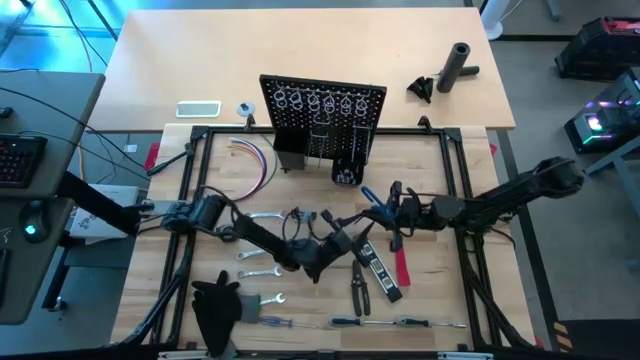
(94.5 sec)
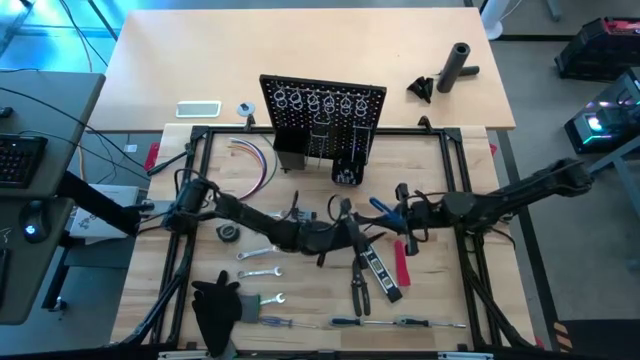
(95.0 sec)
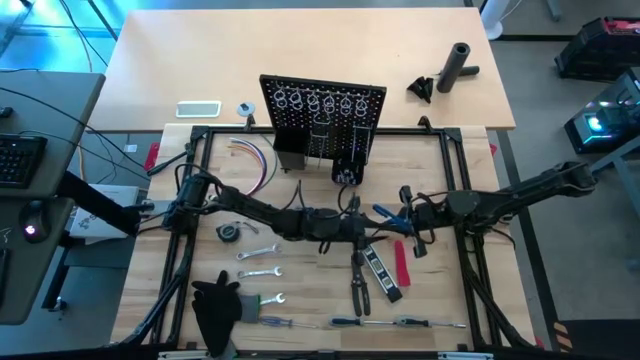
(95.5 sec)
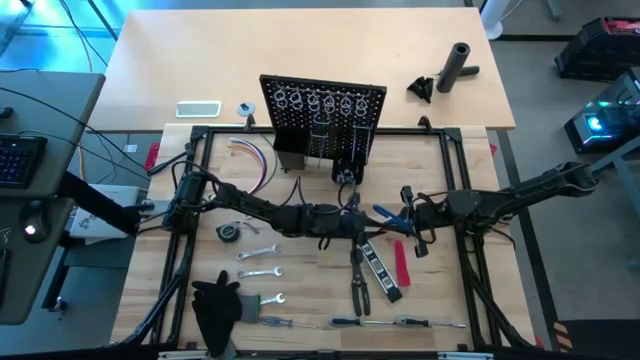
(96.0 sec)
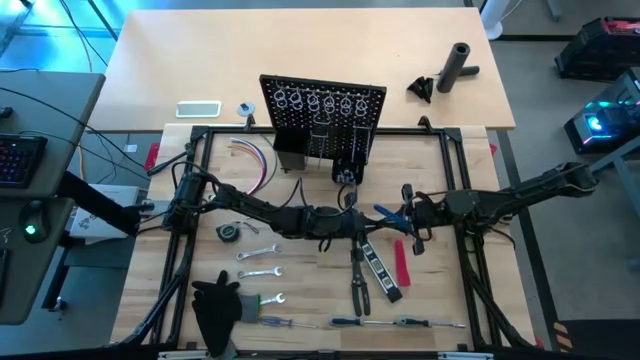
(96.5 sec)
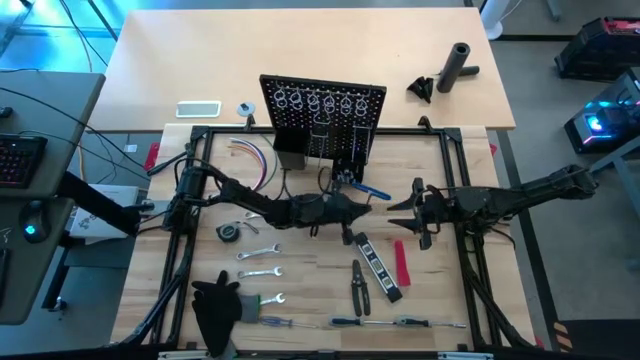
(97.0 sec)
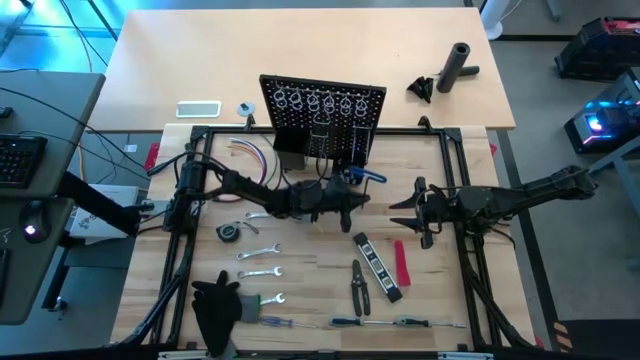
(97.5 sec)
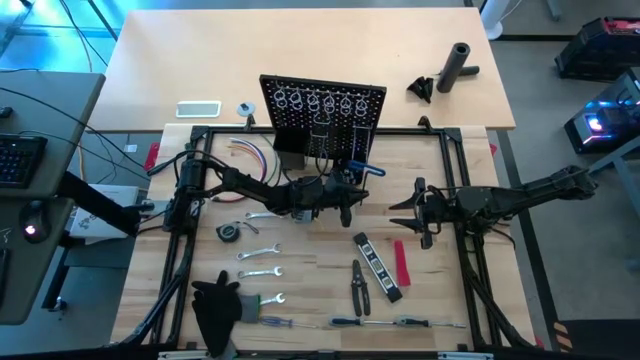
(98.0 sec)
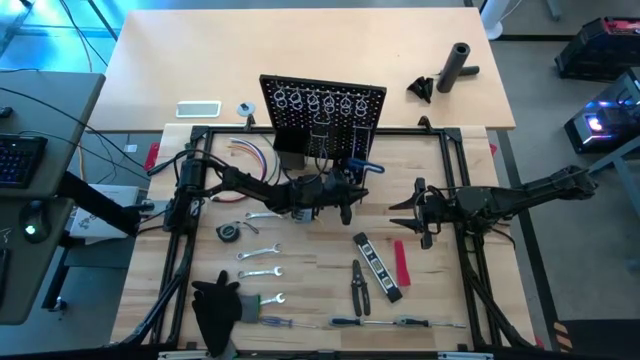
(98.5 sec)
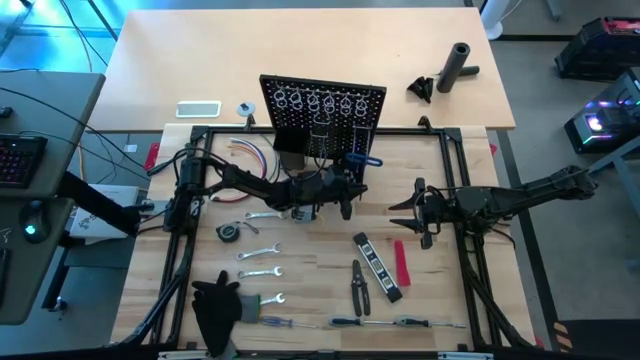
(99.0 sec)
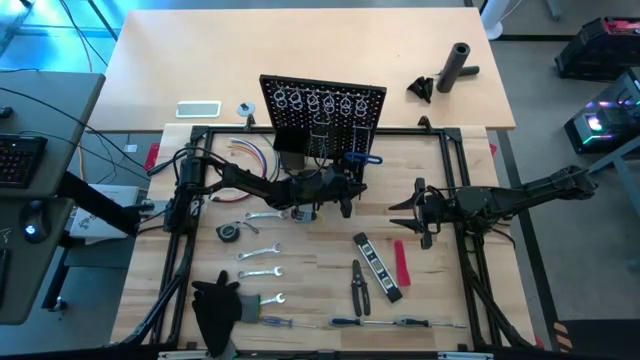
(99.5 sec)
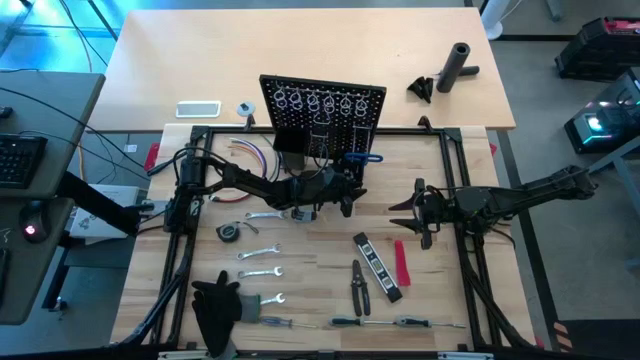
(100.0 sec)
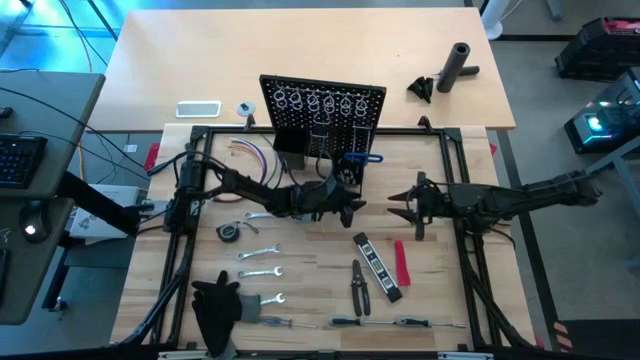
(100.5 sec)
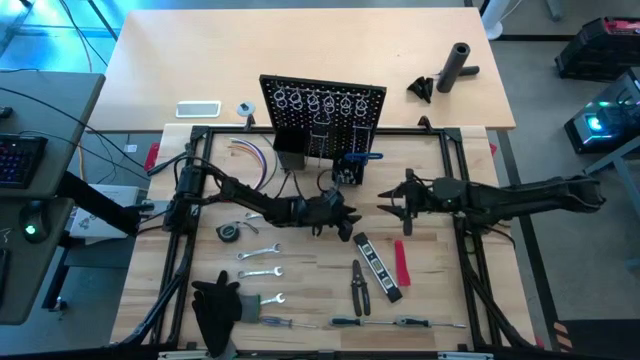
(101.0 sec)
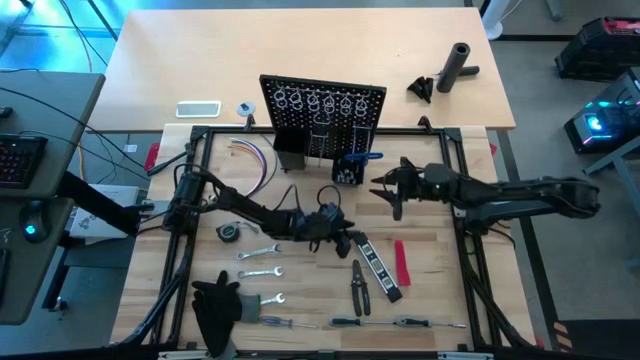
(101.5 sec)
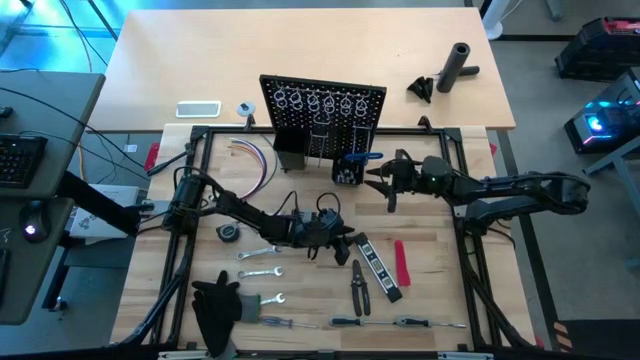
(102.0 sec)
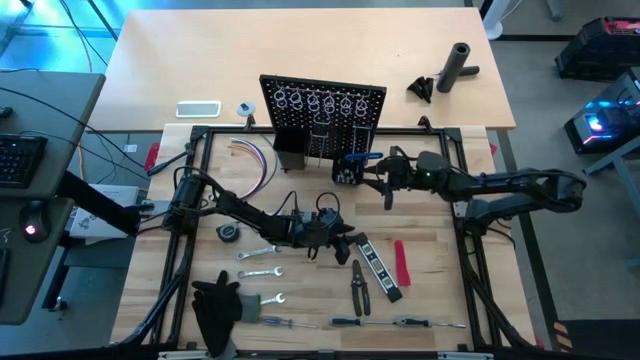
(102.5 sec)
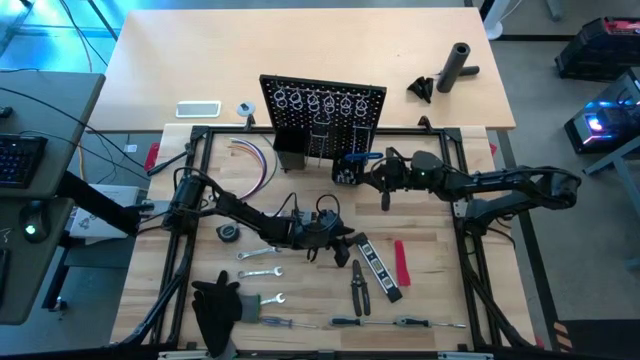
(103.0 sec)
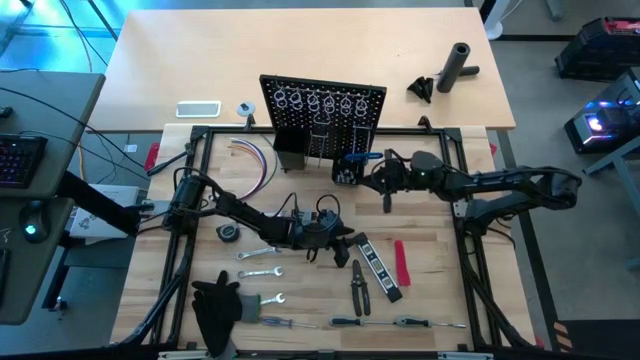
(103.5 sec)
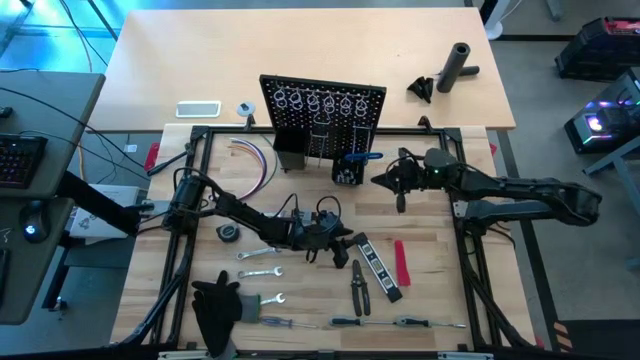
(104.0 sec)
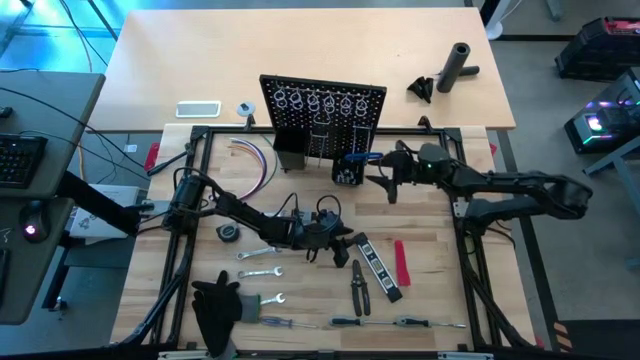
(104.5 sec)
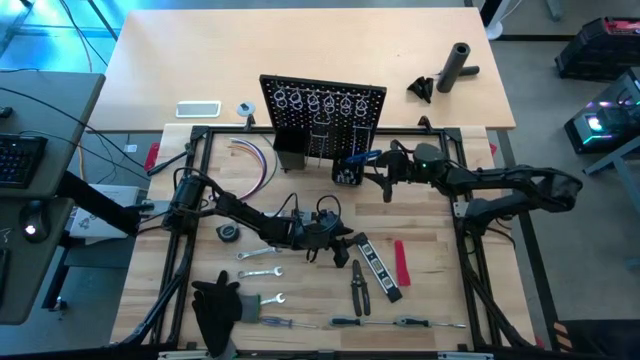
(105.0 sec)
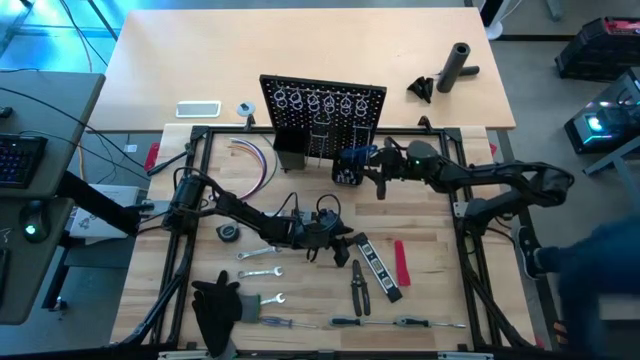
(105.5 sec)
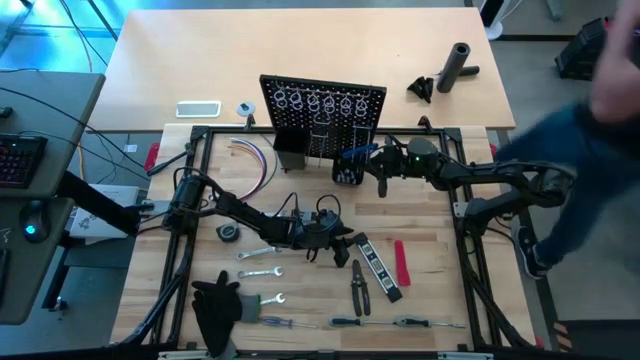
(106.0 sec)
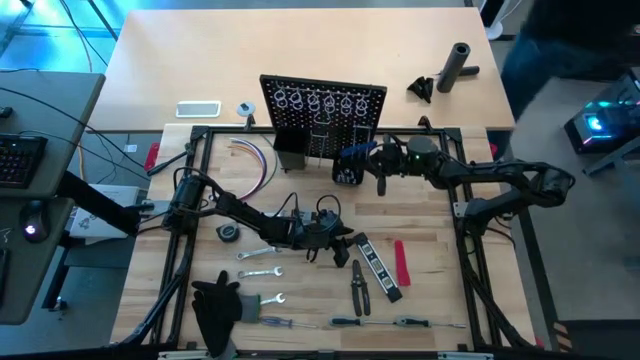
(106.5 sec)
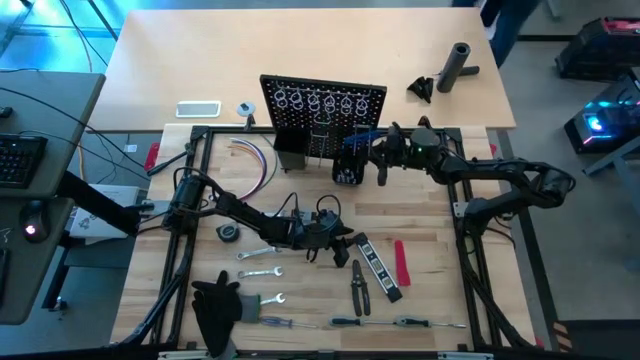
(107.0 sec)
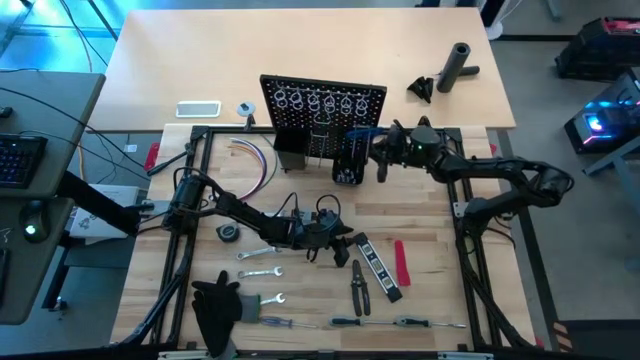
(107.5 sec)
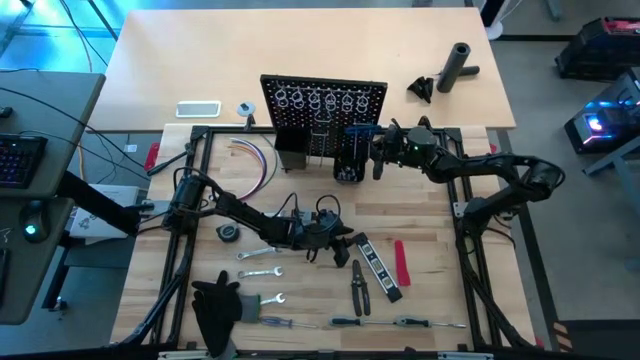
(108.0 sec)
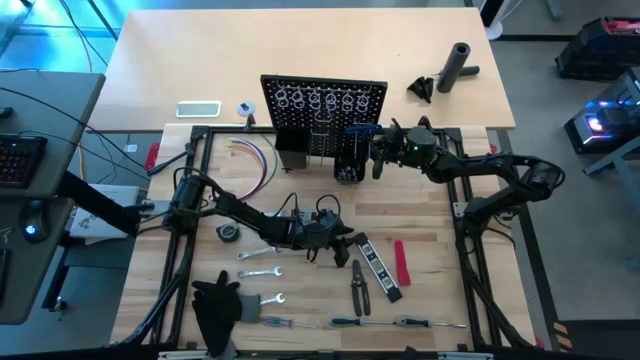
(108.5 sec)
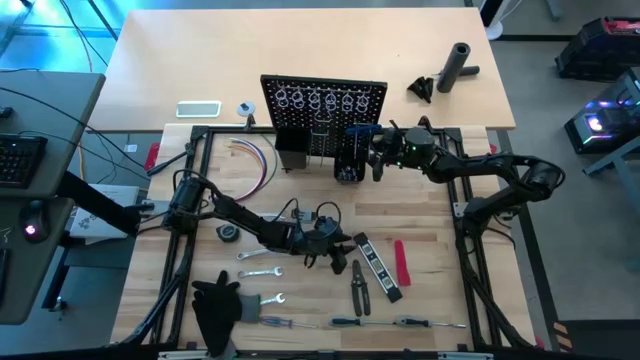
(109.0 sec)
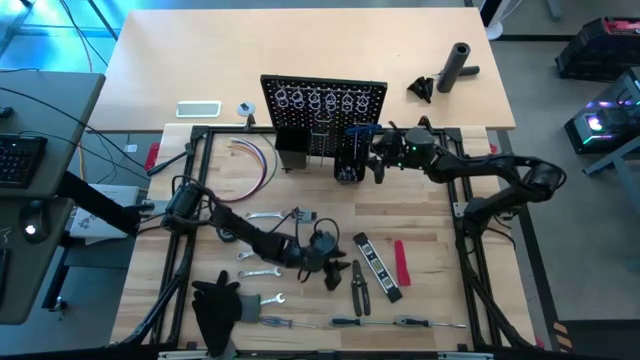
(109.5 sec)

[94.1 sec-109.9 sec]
Task: Hang tools onto peg board
Hang the blue pick tool on the black pegboard

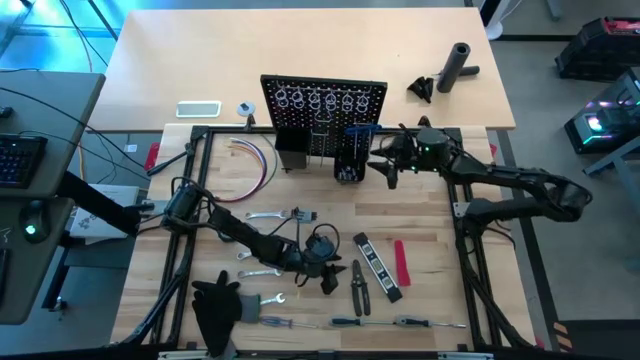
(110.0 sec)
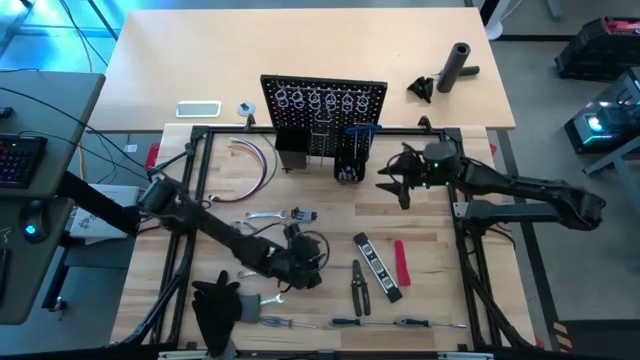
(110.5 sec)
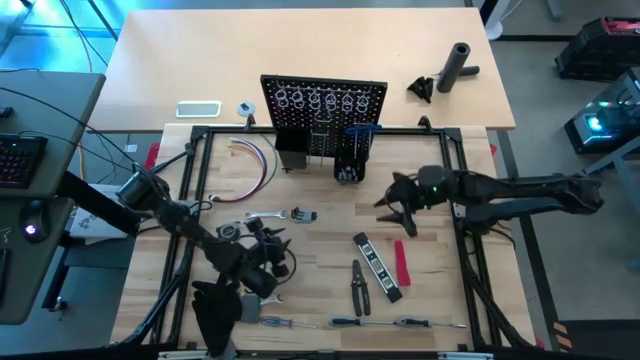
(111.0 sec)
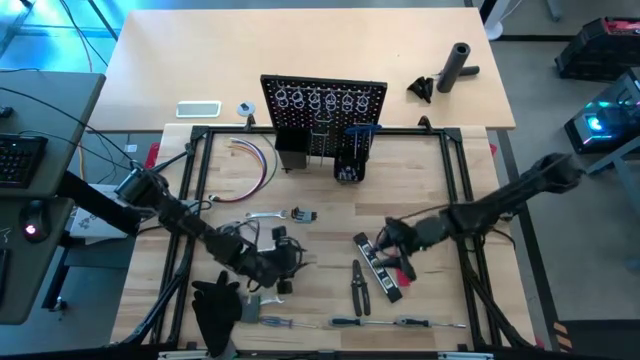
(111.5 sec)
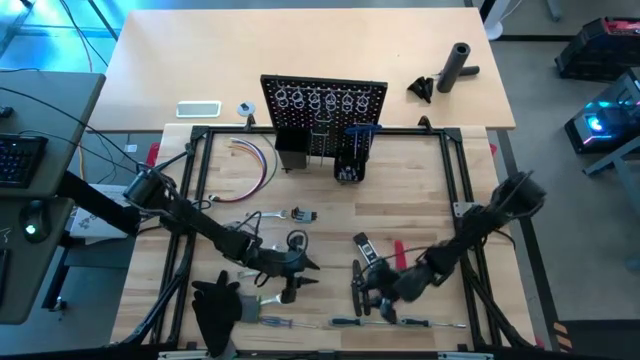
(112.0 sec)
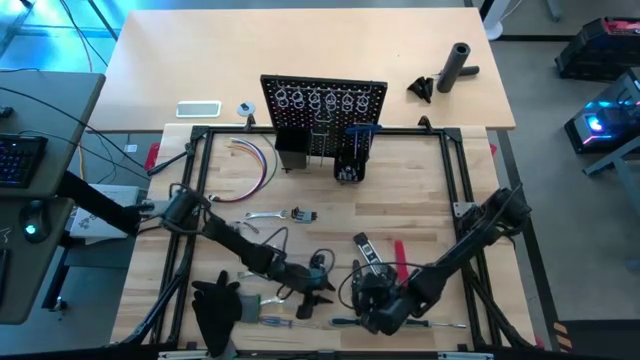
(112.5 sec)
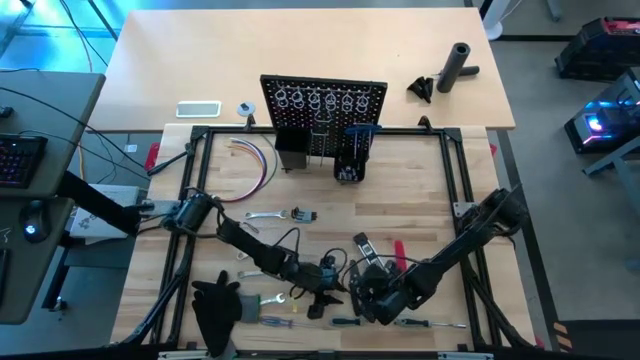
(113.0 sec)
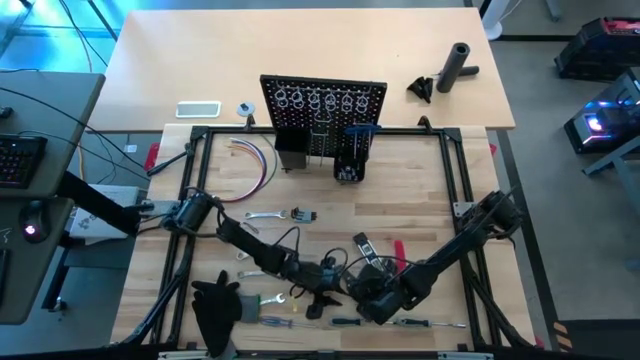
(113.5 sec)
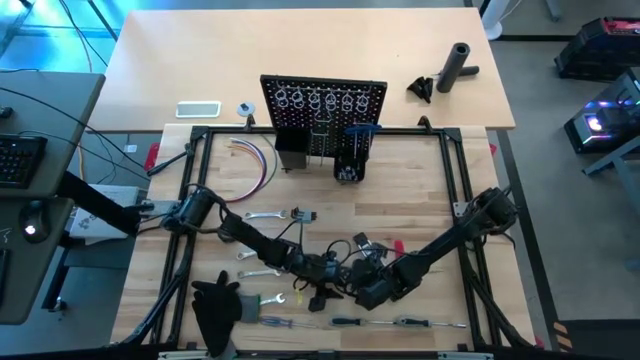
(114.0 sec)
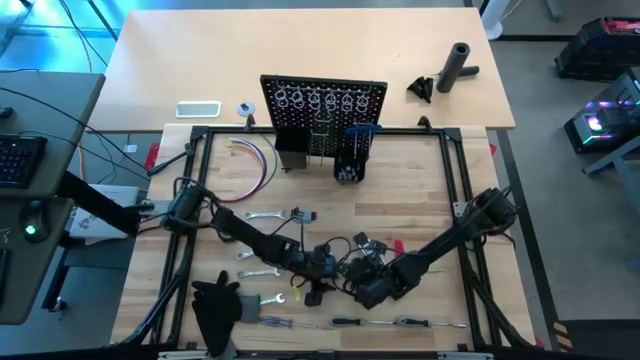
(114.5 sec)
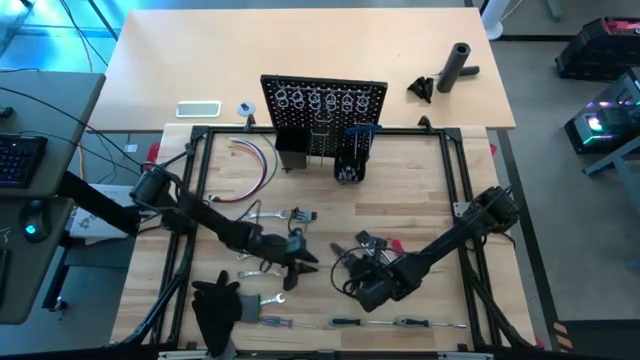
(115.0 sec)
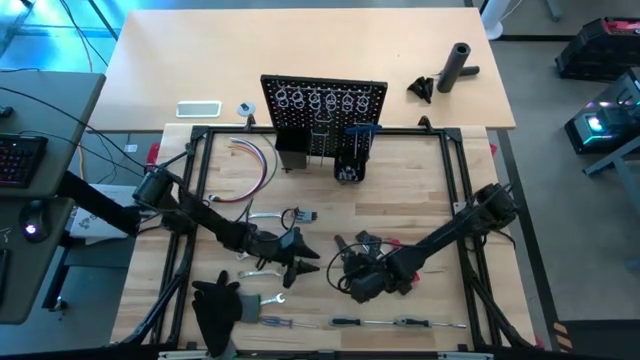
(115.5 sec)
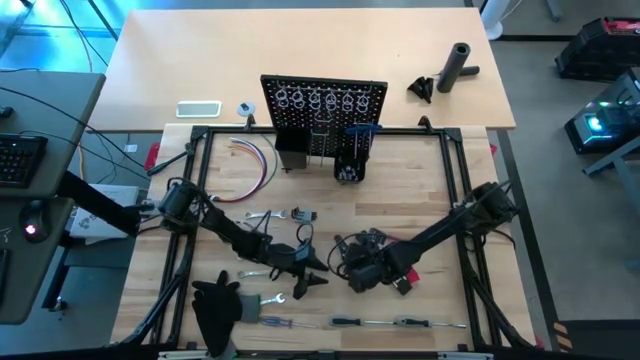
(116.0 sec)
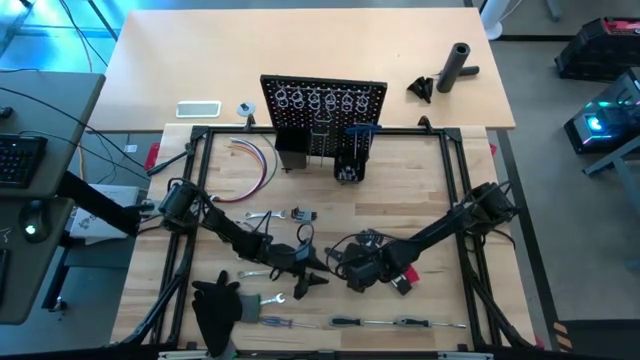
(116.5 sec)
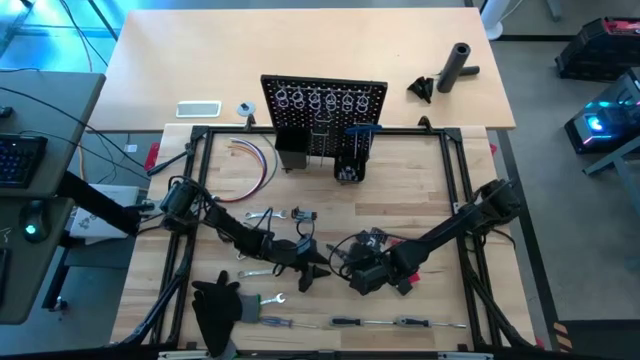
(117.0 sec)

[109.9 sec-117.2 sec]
Hang the black wire stripper on the black pegboard
